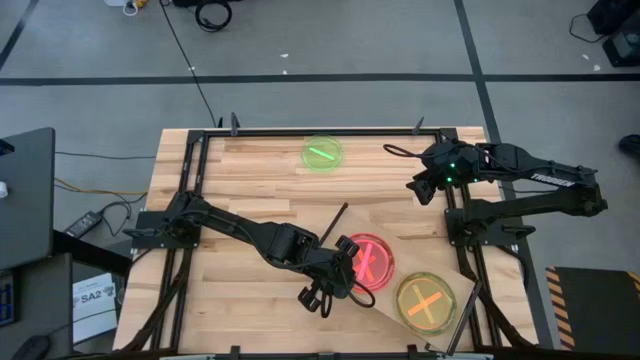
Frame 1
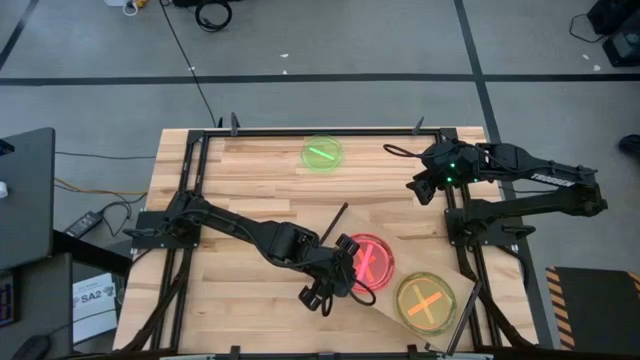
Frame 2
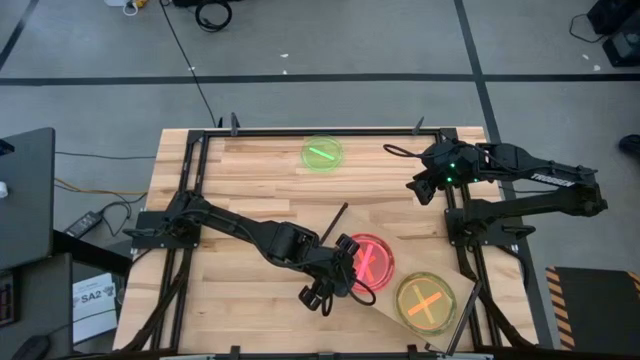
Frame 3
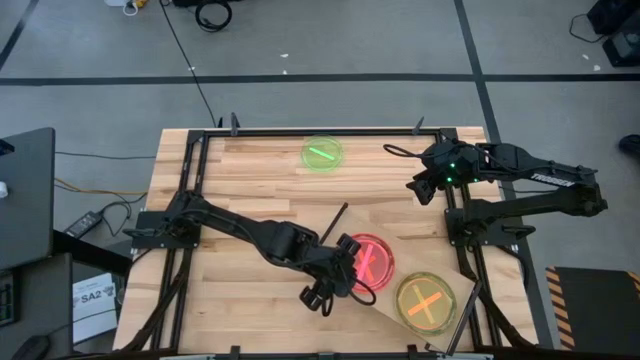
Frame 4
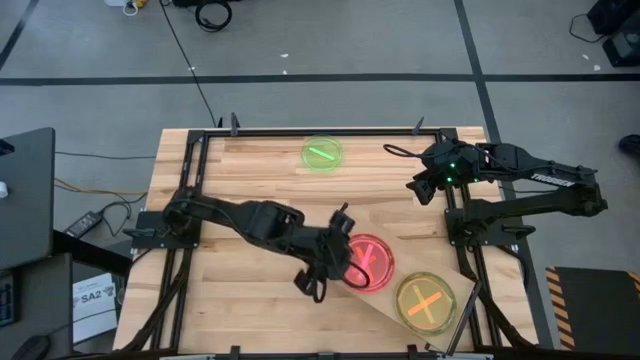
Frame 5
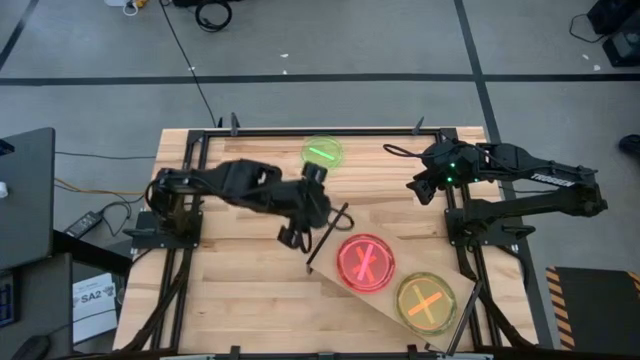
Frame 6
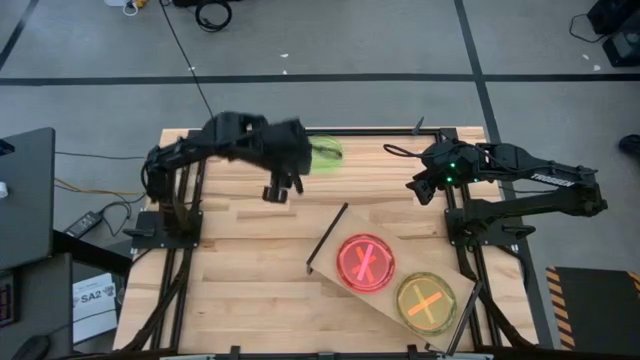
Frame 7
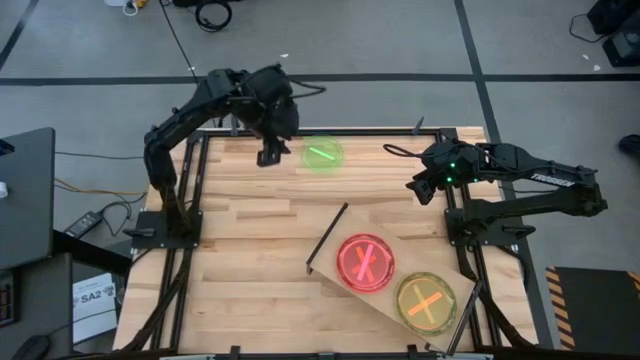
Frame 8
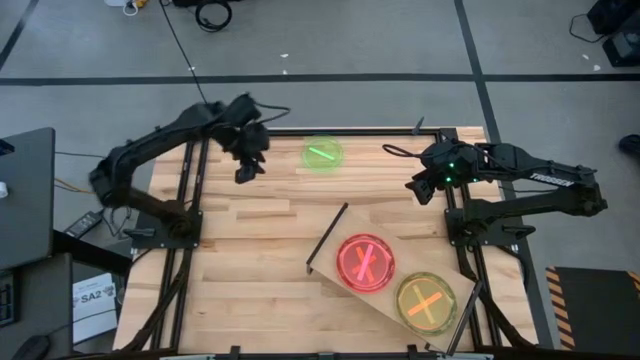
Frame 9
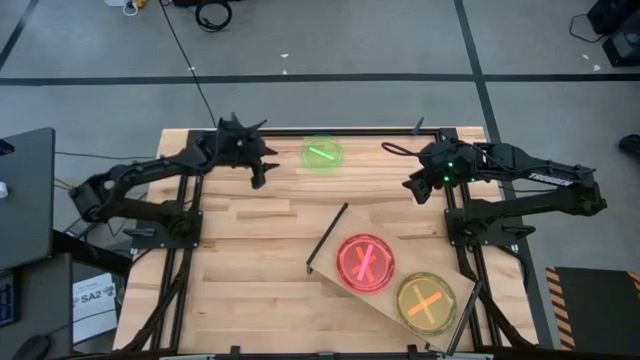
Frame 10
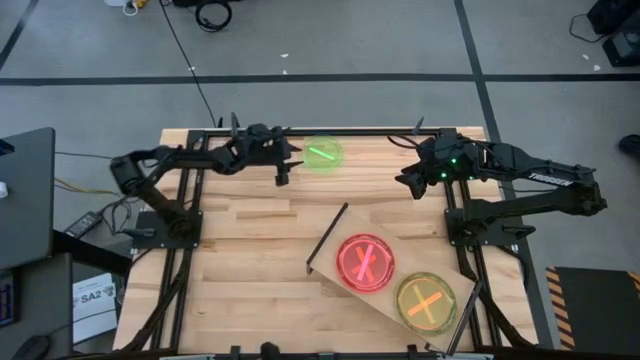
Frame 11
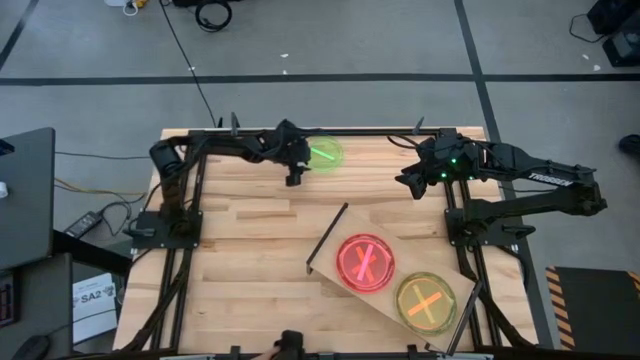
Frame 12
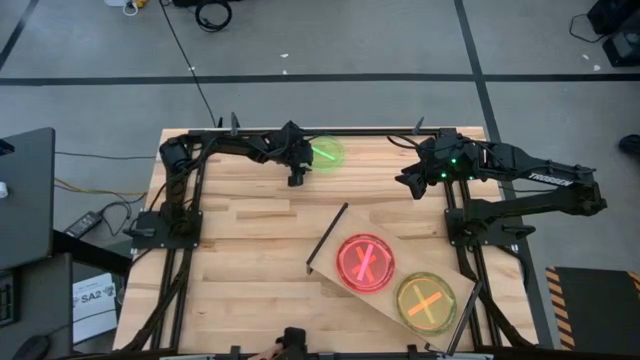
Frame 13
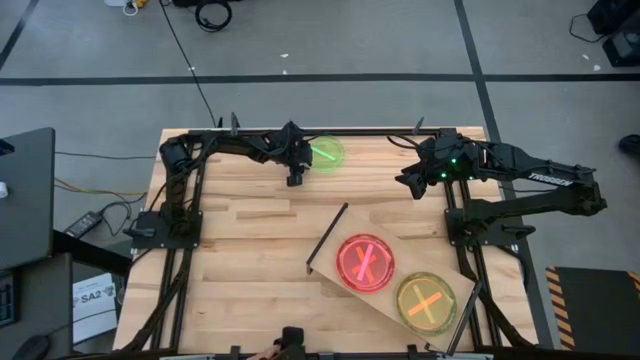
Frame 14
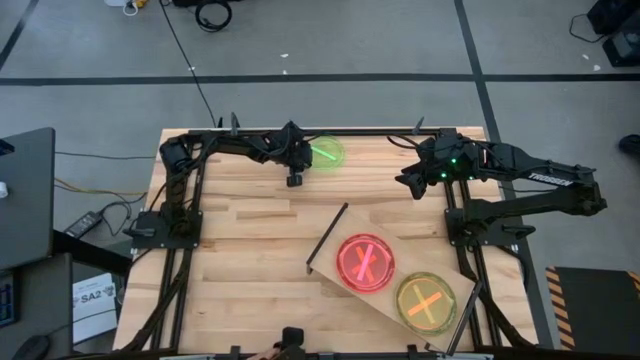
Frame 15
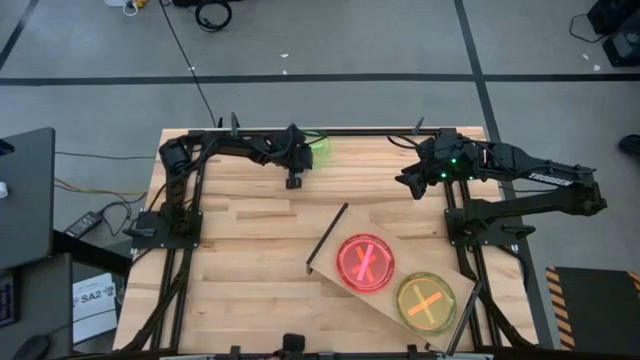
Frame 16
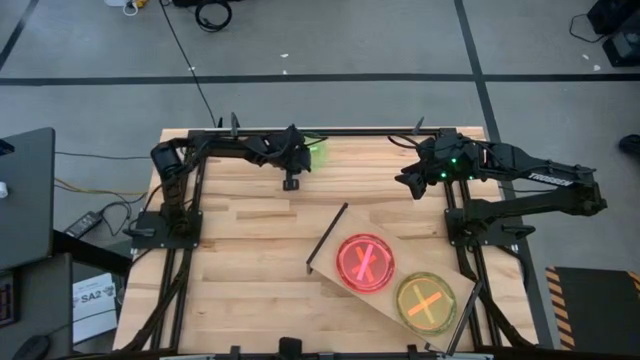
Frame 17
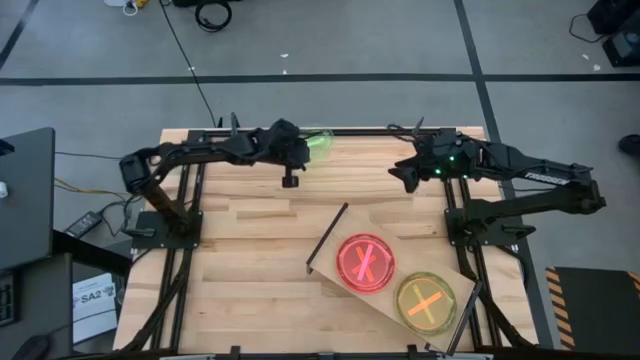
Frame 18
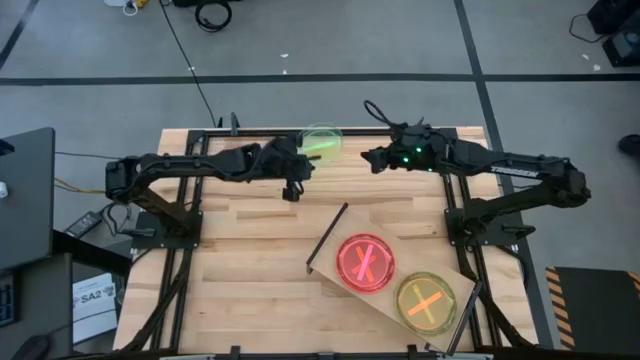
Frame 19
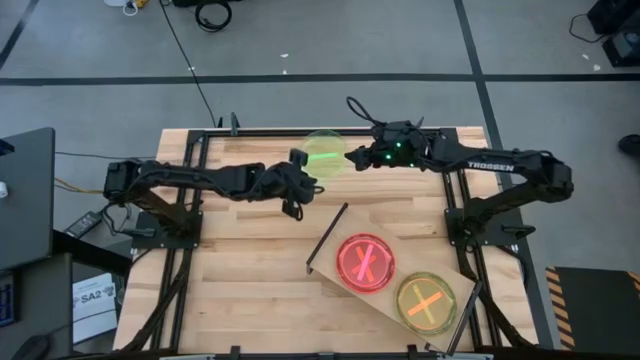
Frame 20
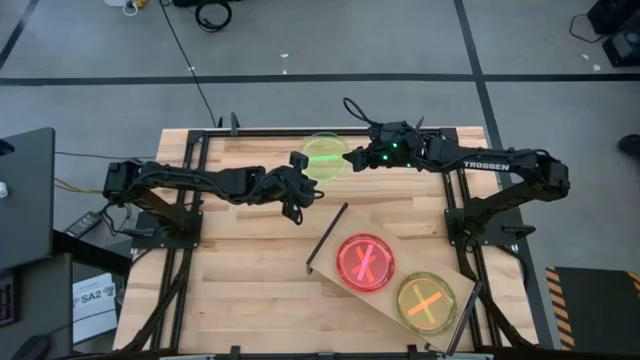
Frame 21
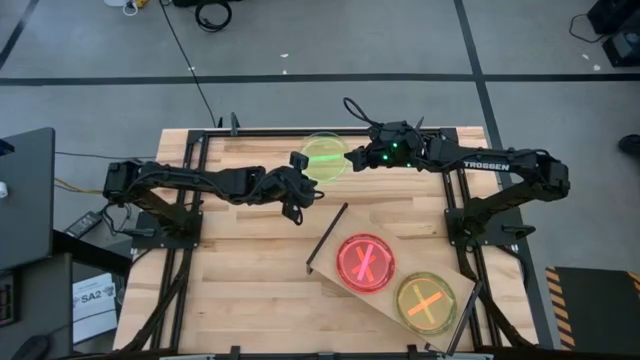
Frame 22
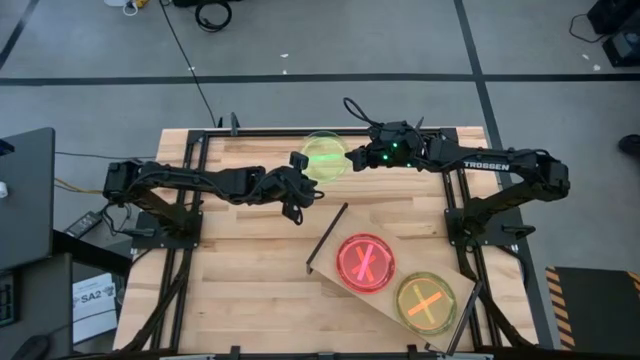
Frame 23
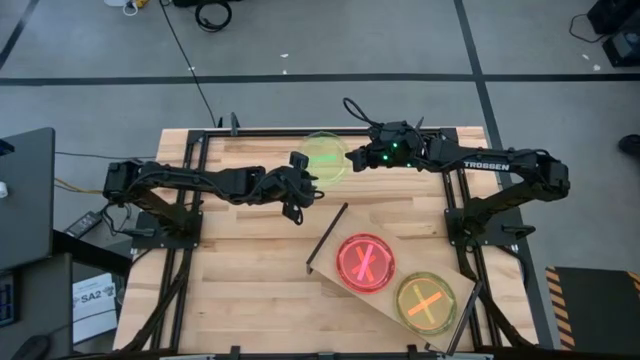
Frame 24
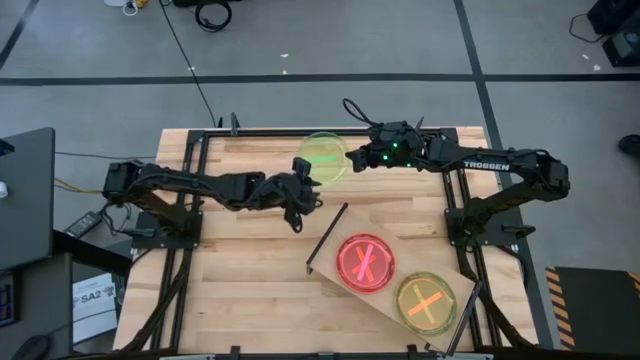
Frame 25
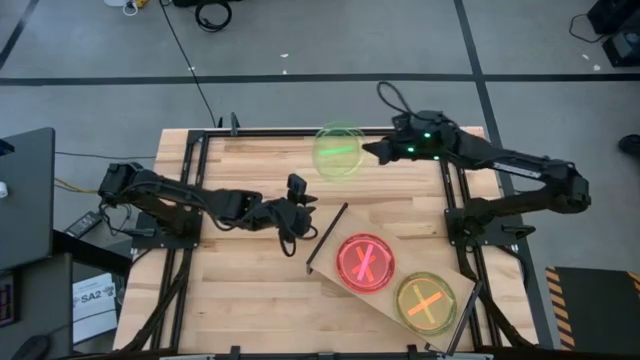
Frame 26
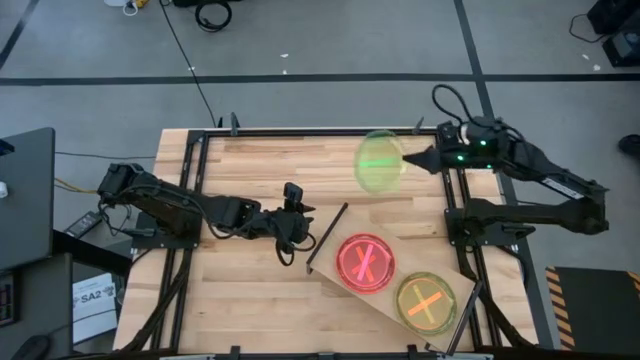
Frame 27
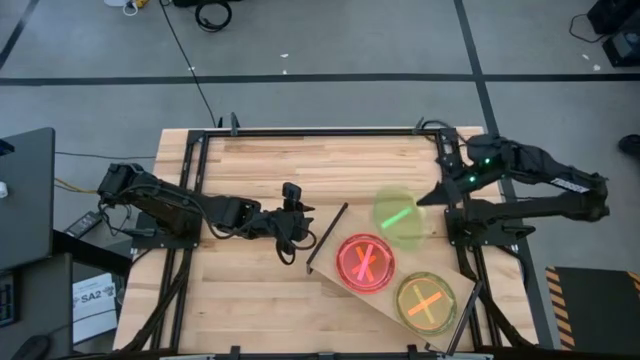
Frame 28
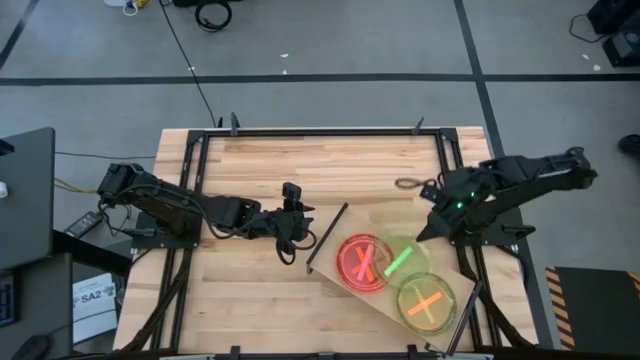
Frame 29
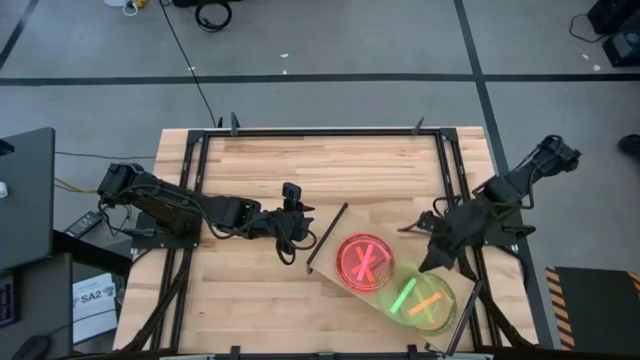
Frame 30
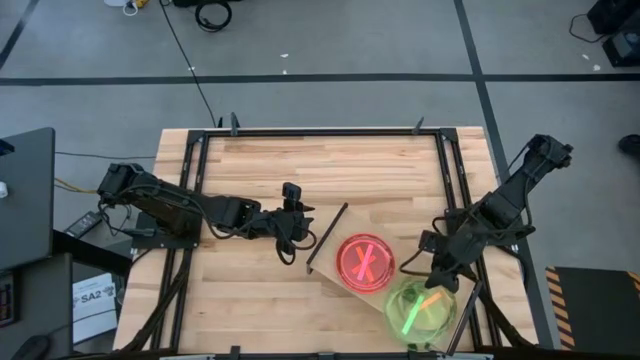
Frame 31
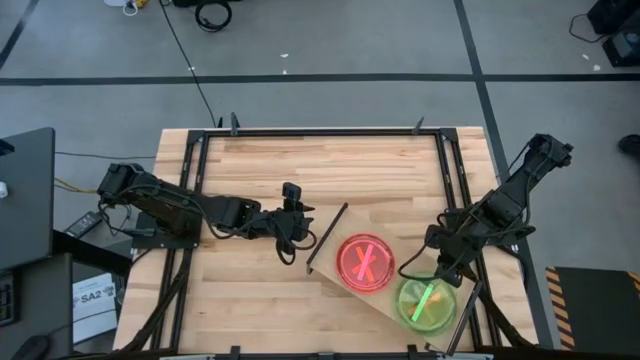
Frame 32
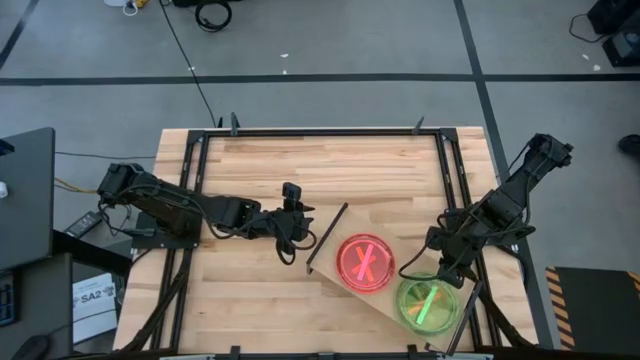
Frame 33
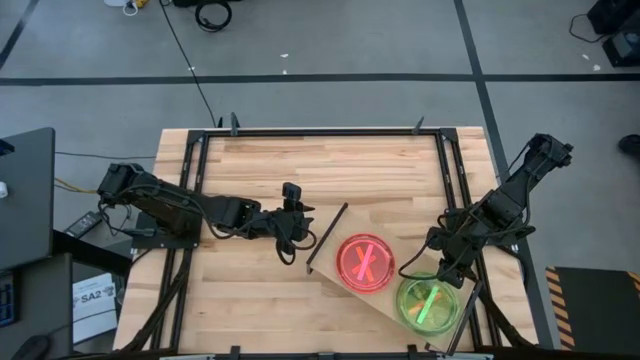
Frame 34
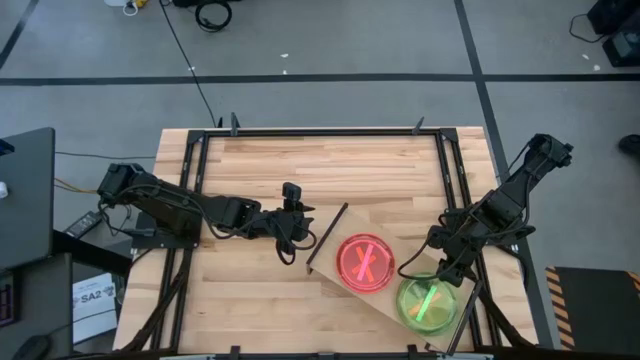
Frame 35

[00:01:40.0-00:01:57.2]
Task: Place and stack plates onto a shelf
Stack the transparent green plate on the transparent orange plate on the shelf

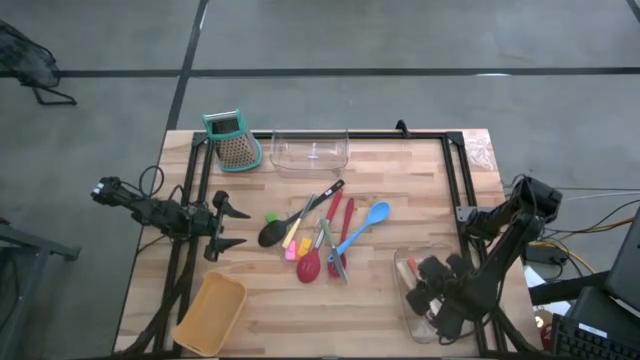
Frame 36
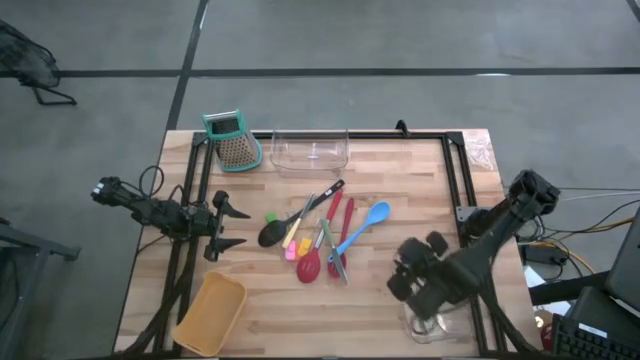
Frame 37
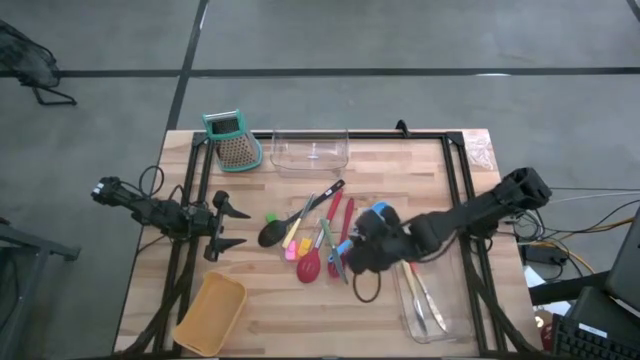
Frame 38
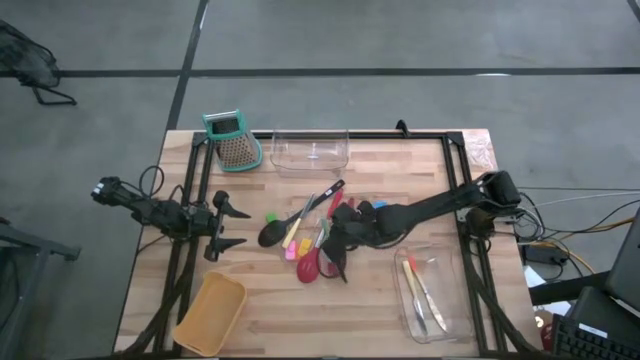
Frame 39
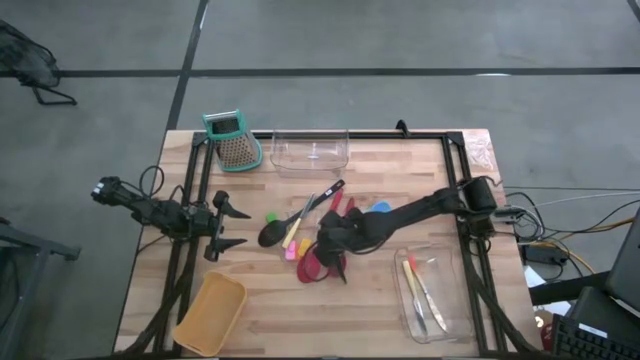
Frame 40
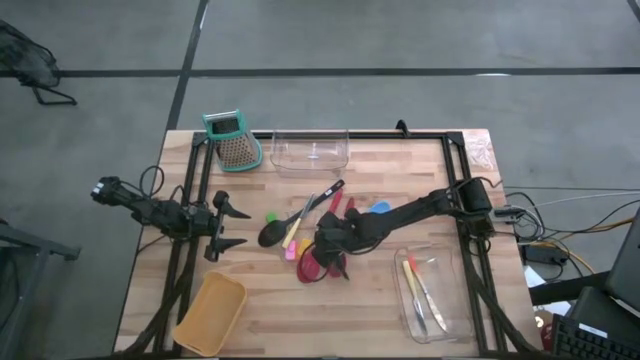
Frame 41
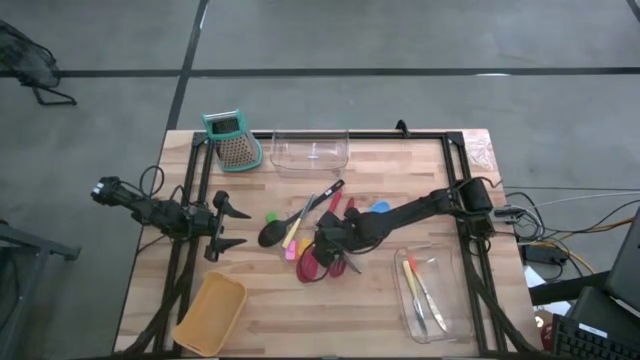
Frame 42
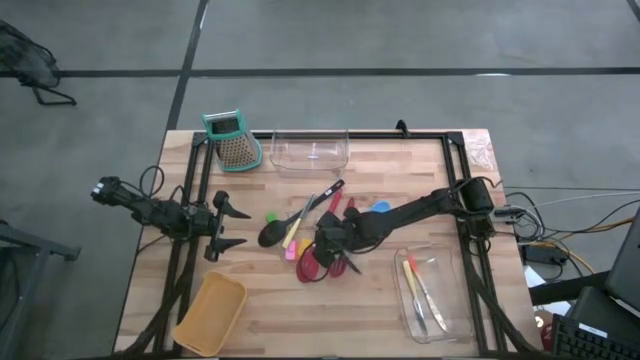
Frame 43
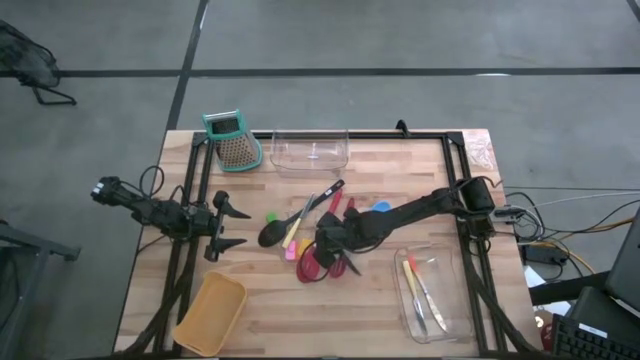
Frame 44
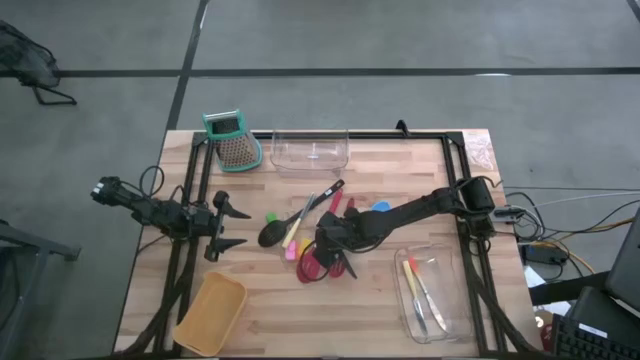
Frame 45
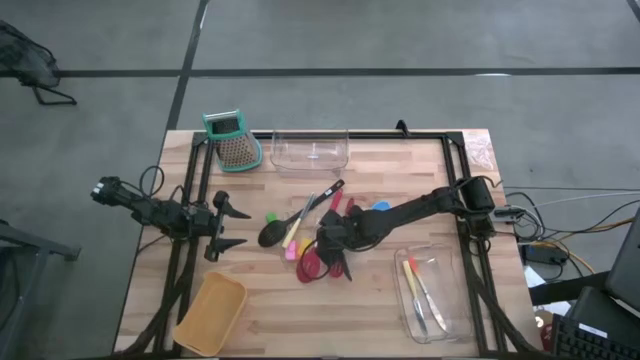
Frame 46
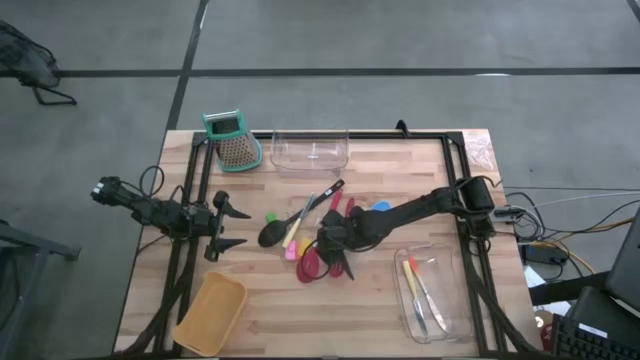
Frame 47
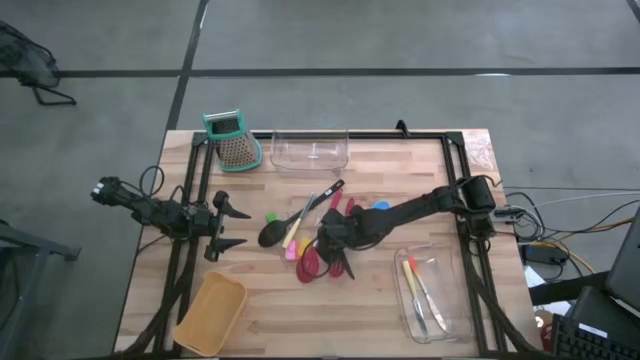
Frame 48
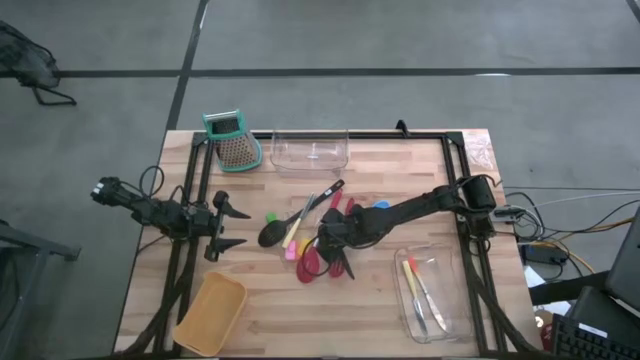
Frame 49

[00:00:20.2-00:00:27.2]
Task: Pick & Place Kitchen Items
Put the greenish gray knife into the bottom transparent bin
